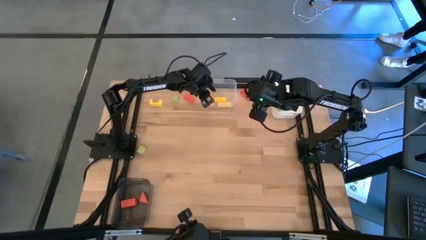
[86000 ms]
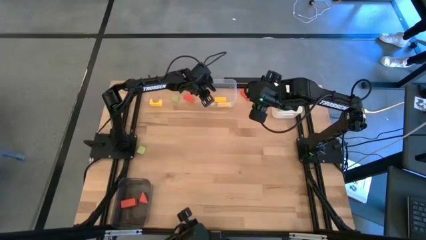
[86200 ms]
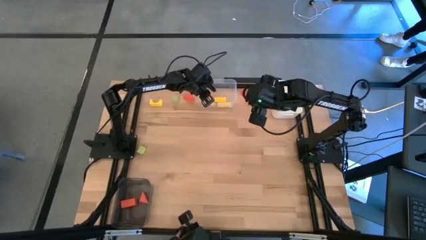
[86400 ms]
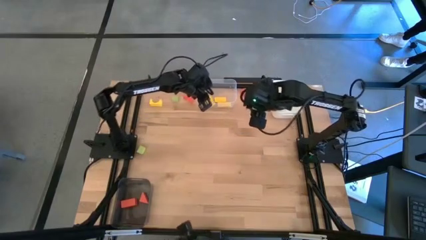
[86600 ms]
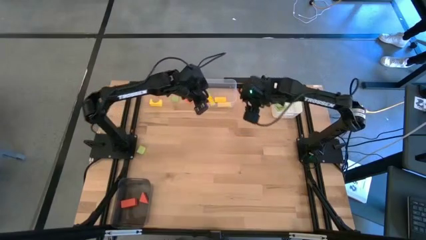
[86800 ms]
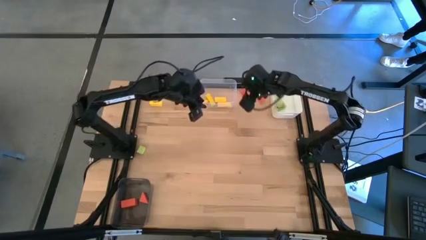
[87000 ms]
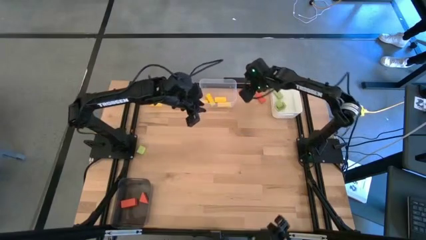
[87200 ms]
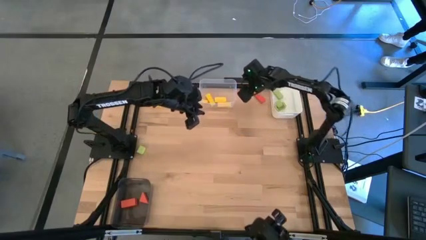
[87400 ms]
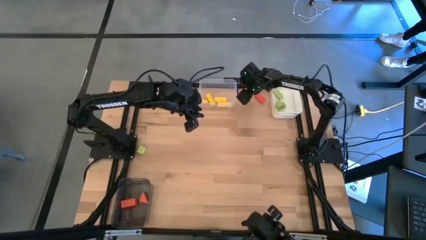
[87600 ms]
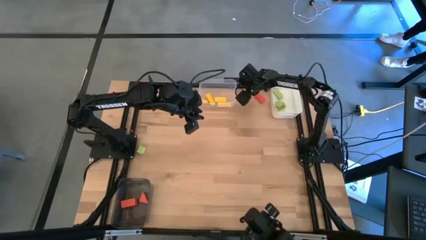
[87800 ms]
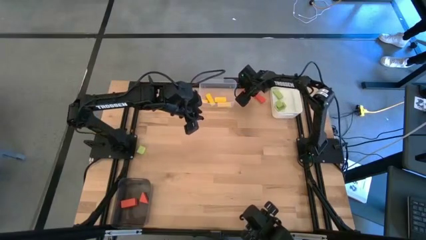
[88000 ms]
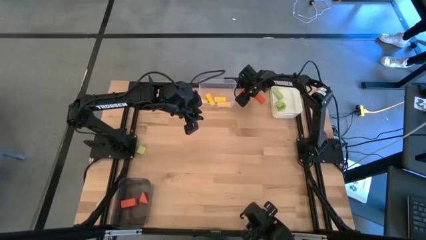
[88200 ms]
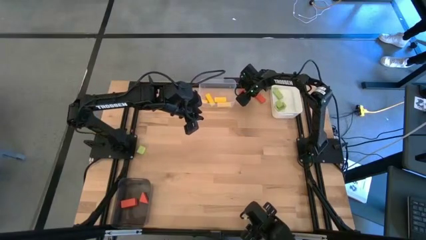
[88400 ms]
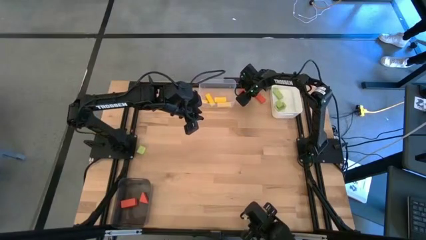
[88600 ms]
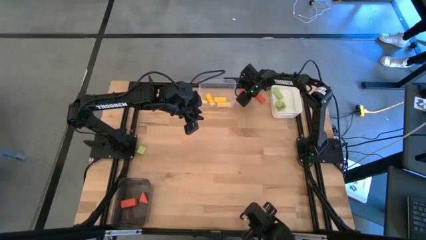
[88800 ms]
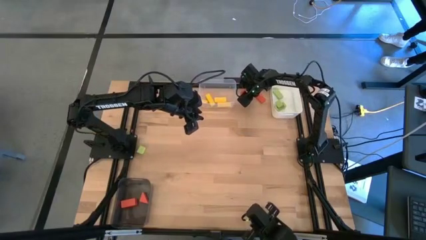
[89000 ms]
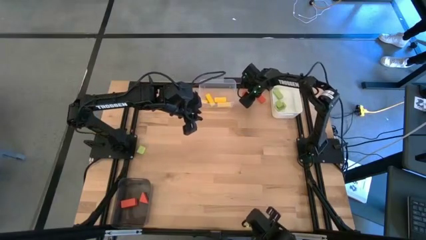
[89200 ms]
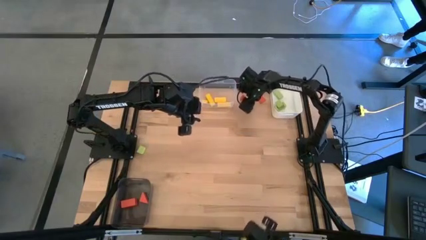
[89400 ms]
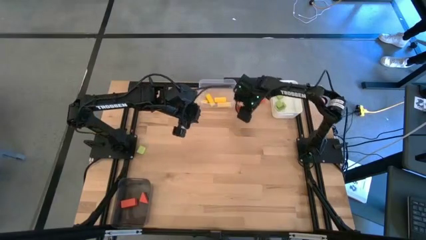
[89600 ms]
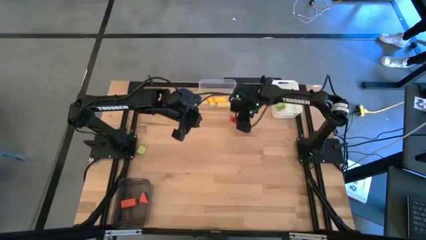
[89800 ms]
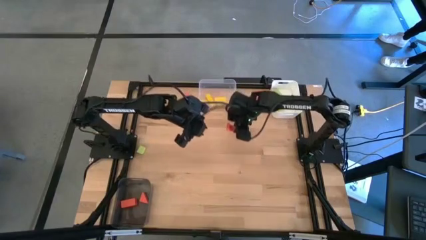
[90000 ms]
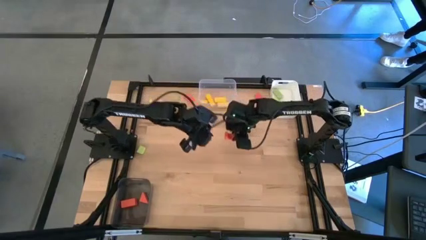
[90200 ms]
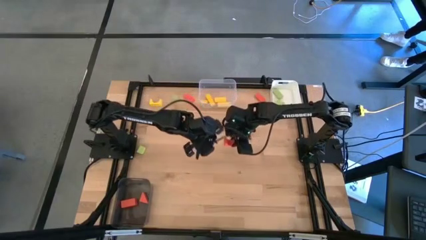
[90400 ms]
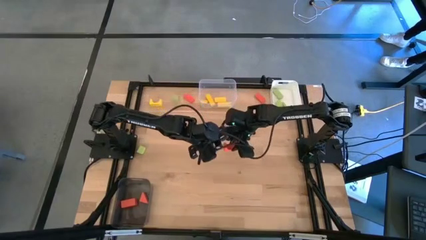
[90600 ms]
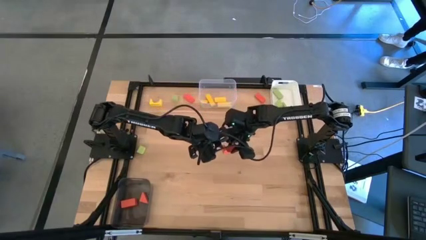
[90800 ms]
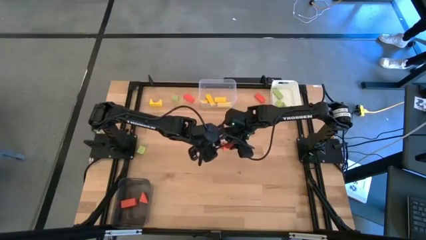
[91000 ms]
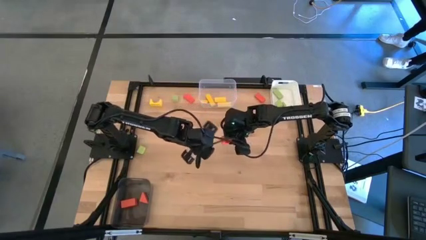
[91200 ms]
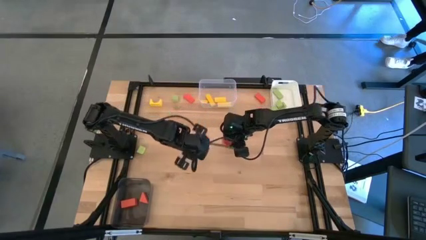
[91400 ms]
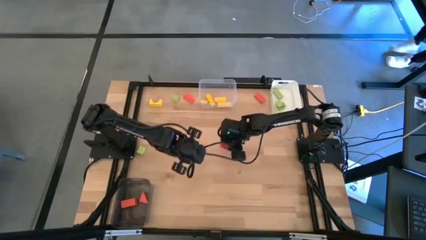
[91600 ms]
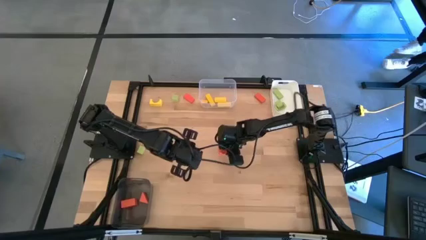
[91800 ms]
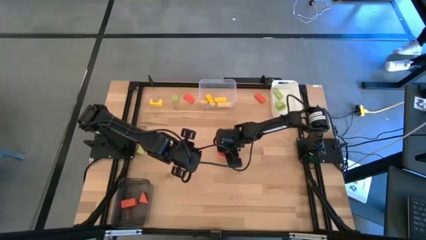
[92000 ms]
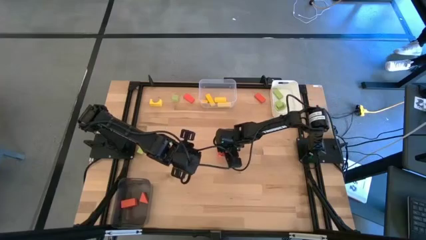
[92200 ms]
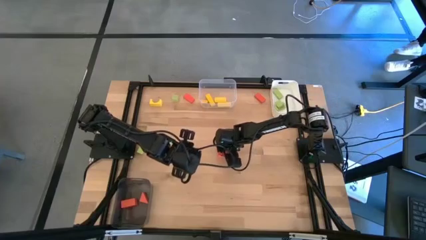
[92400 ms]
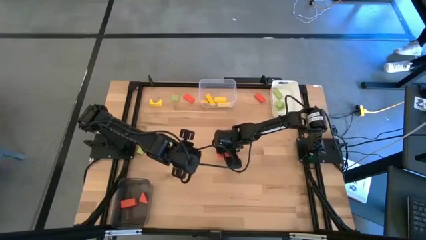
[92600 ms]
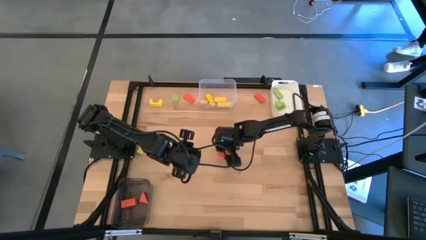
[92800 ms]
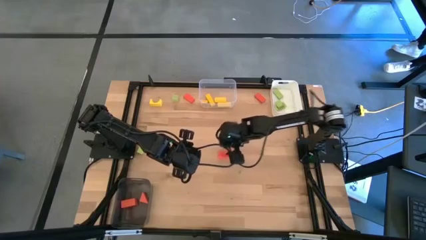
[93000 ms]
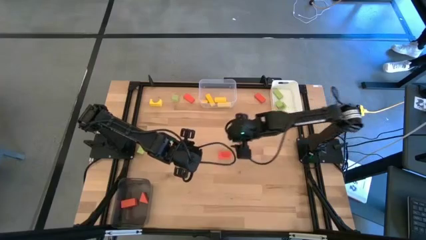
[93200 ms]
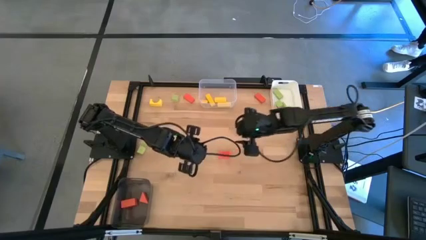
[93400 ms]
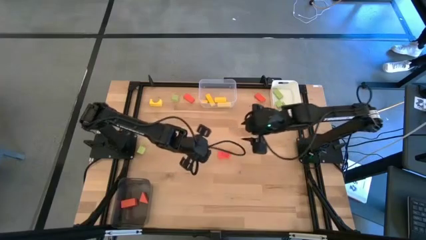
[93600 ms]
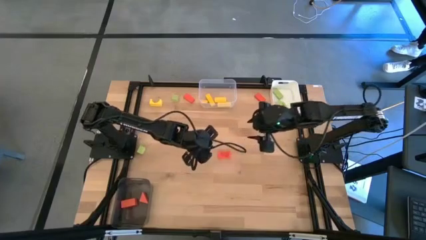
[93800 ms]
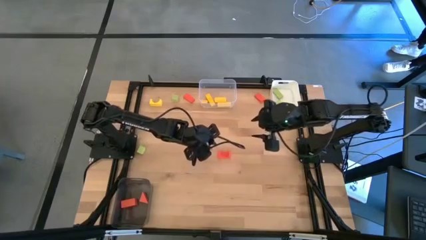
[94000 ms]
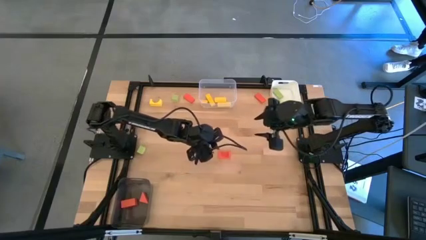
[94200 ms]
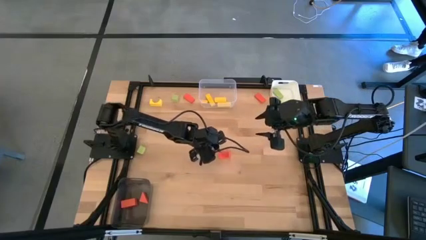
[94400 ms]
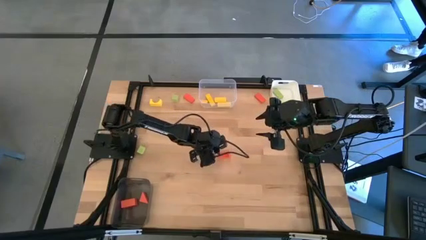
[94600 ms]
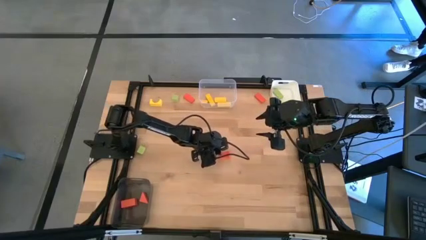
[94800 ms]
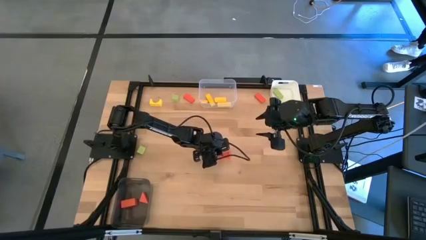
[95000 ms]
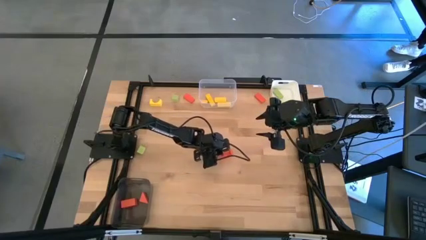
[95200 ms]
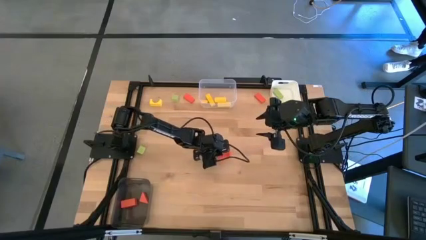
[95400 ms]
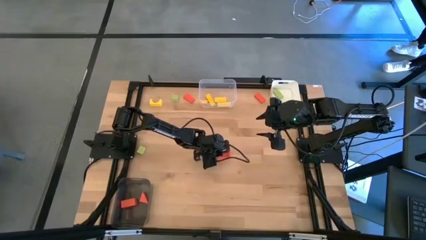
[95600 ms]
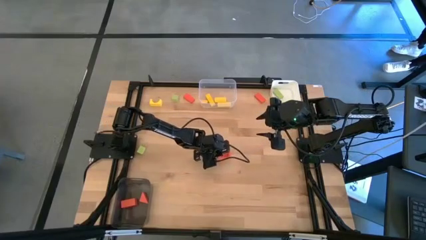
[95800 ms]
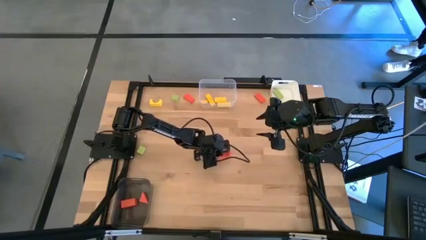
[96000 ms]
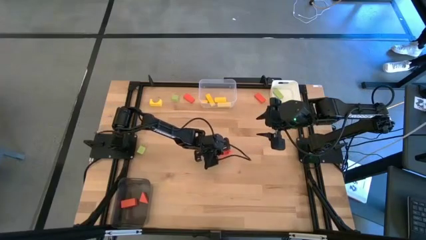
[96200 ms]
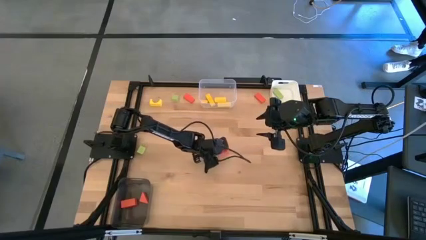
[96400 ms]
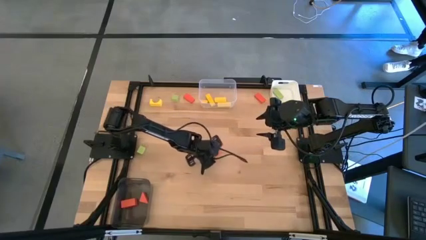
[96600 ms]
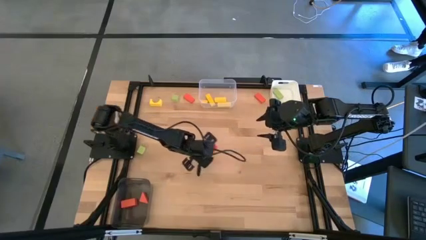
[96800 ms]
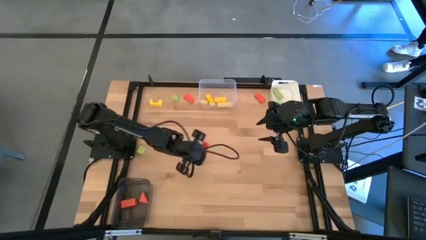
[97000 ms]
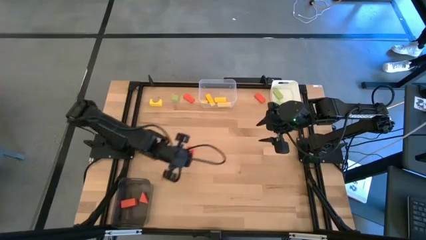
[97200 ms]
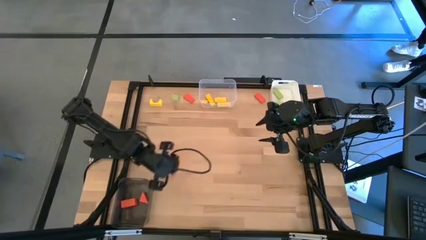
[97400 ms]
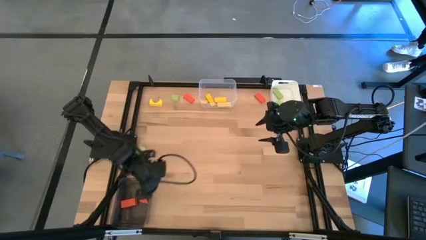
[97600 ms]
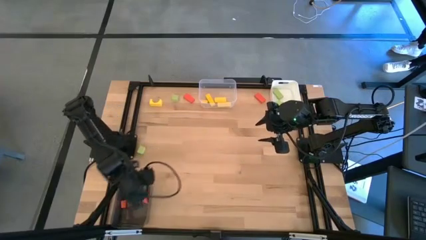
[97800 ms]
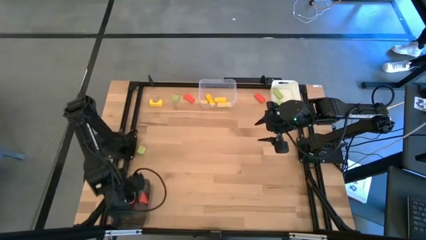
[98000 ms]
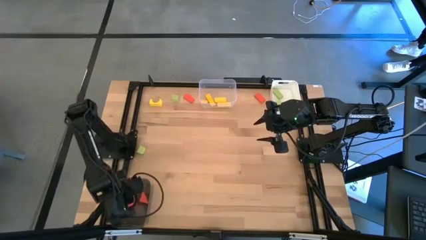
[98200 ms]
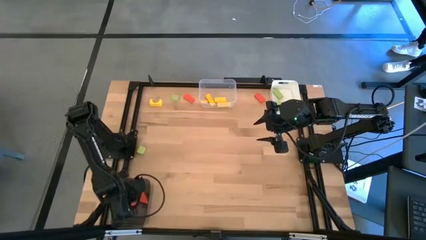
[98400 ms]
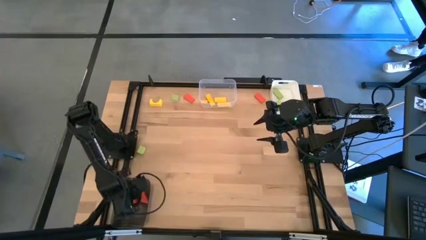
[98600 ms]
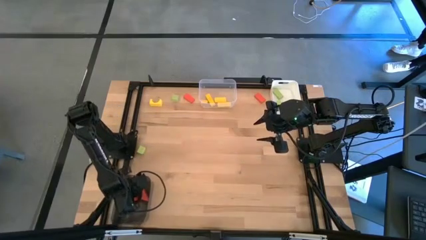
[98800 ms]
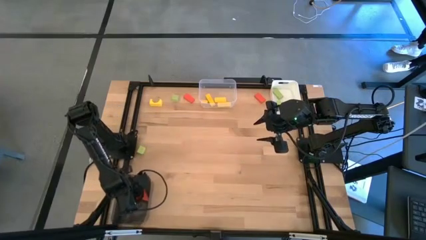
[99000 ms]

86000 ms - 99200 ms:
Task: Sort & place blocks by color
Put the orange arched block into the black bin
